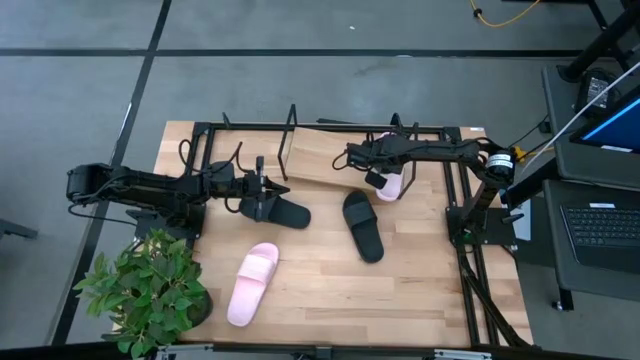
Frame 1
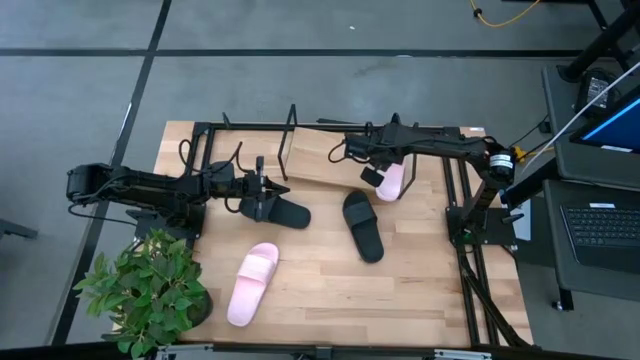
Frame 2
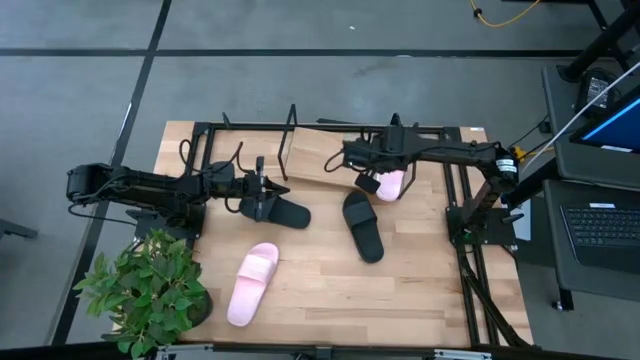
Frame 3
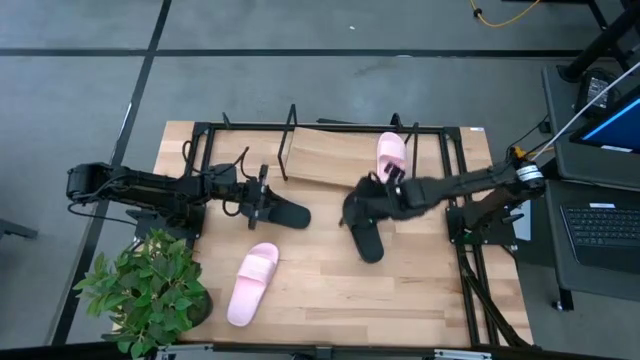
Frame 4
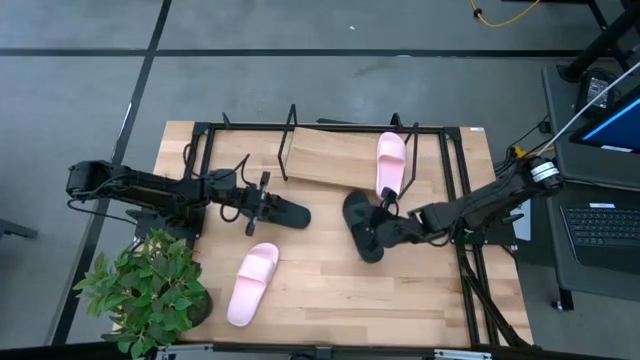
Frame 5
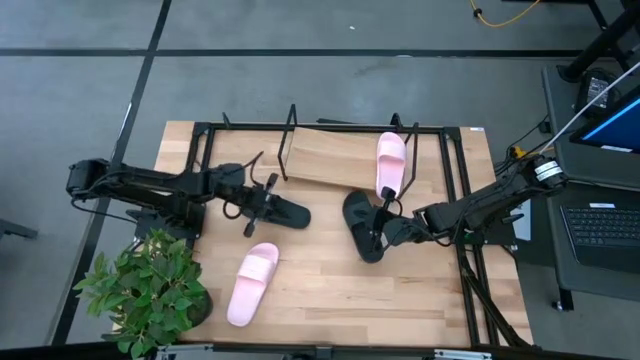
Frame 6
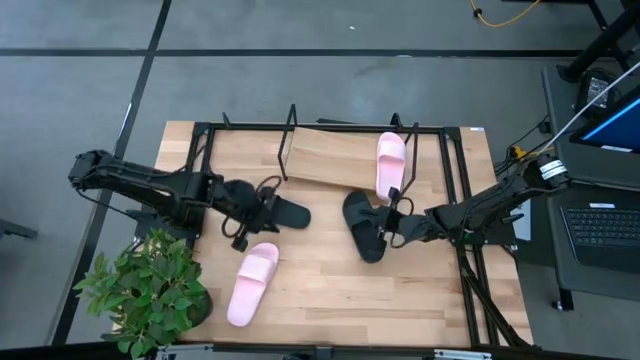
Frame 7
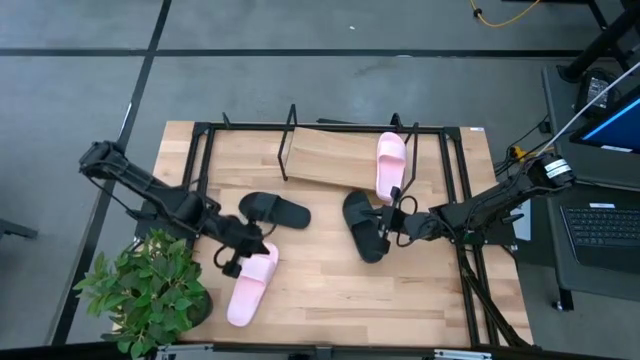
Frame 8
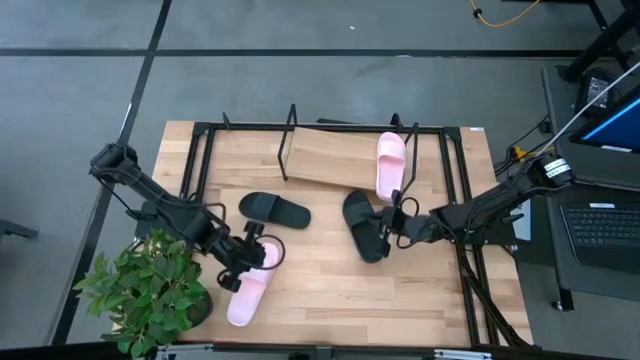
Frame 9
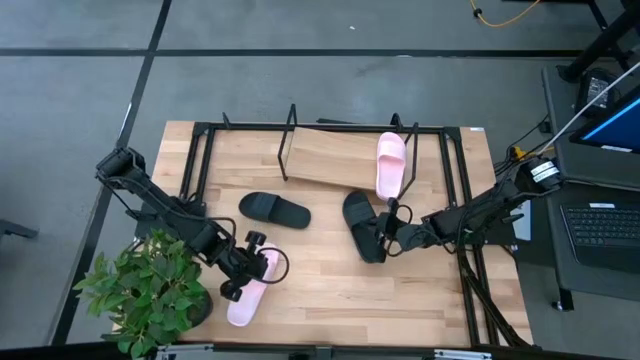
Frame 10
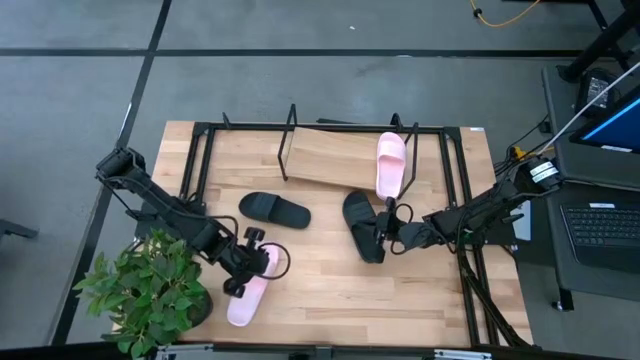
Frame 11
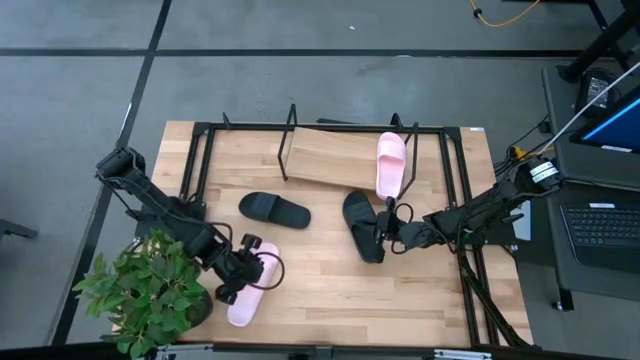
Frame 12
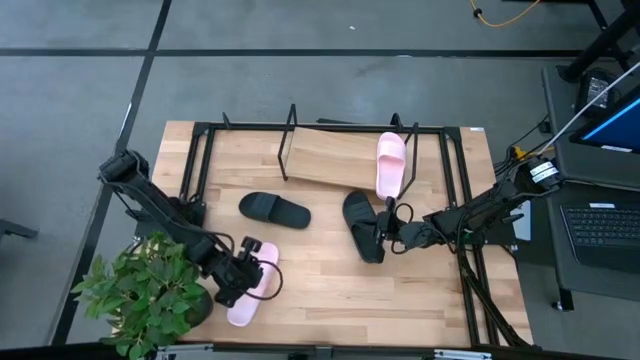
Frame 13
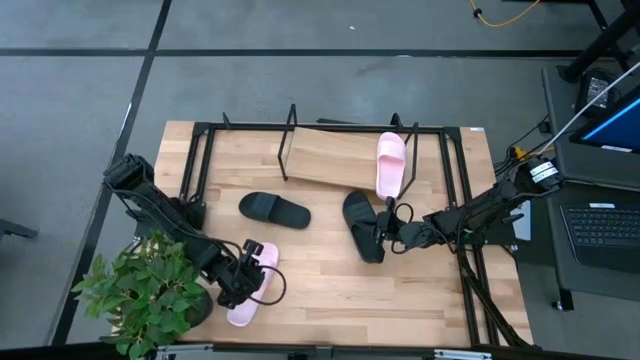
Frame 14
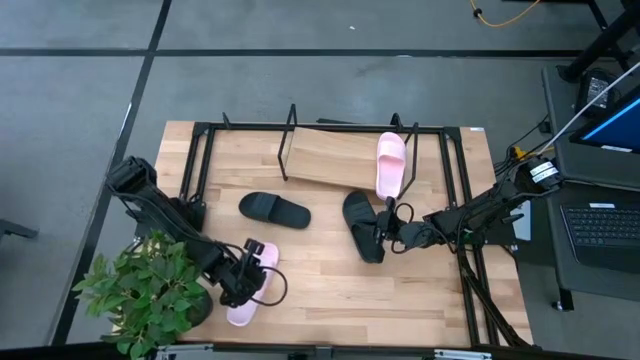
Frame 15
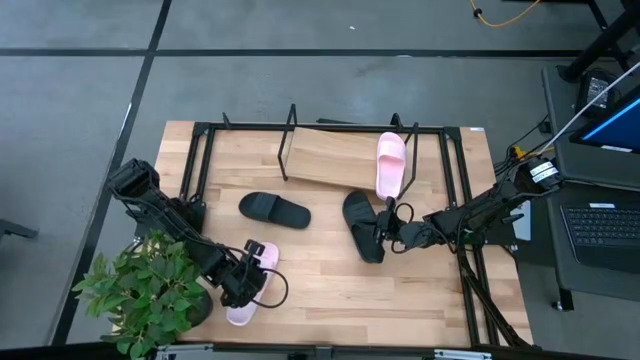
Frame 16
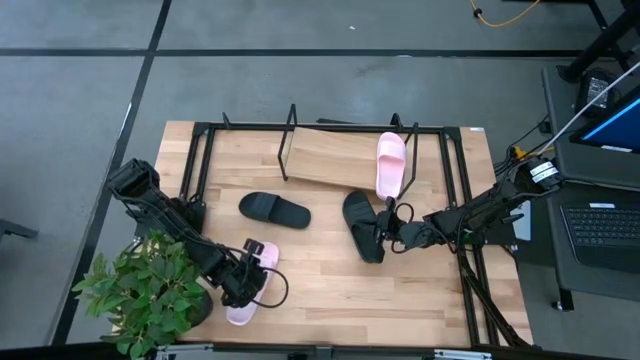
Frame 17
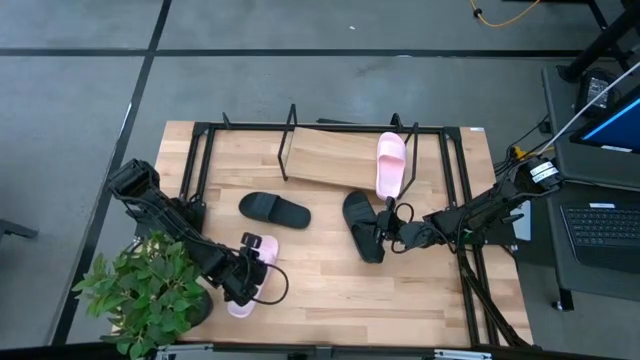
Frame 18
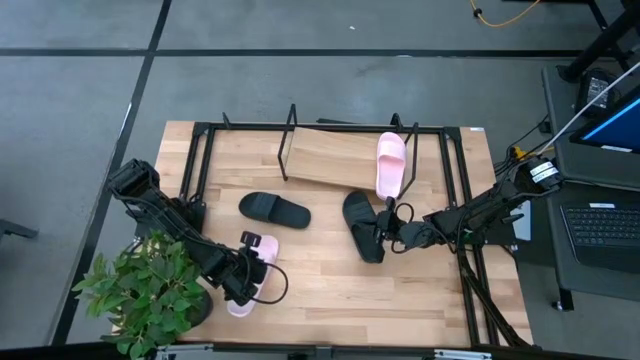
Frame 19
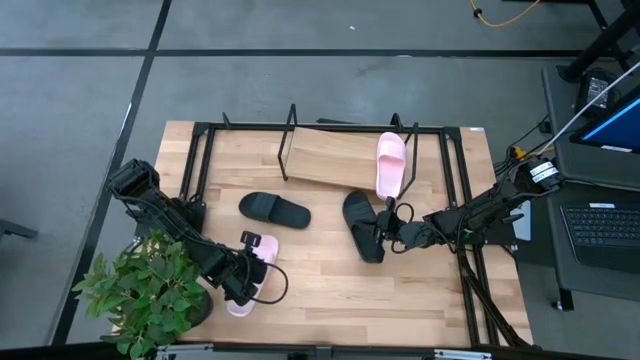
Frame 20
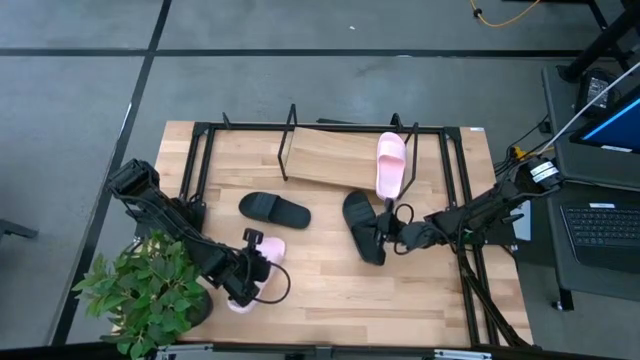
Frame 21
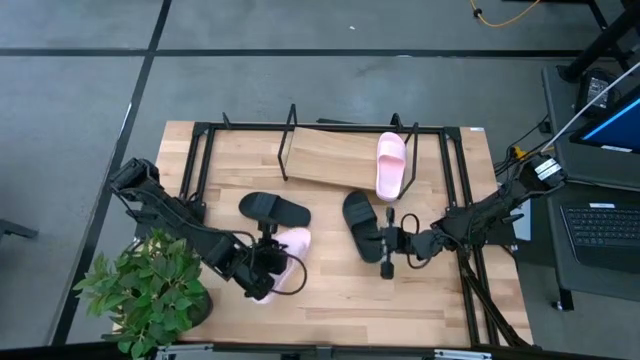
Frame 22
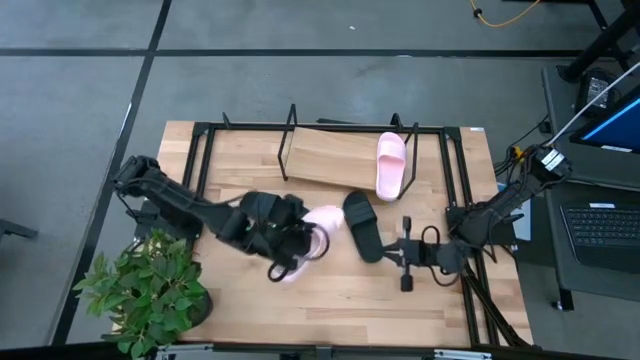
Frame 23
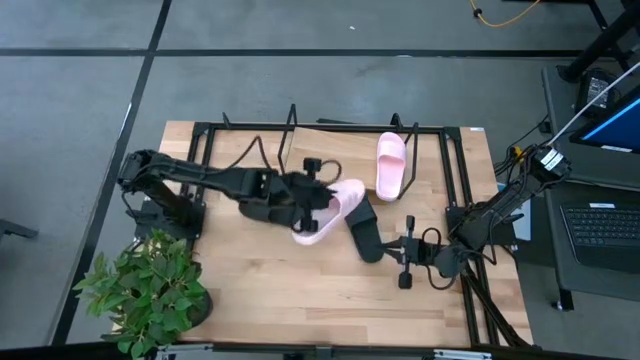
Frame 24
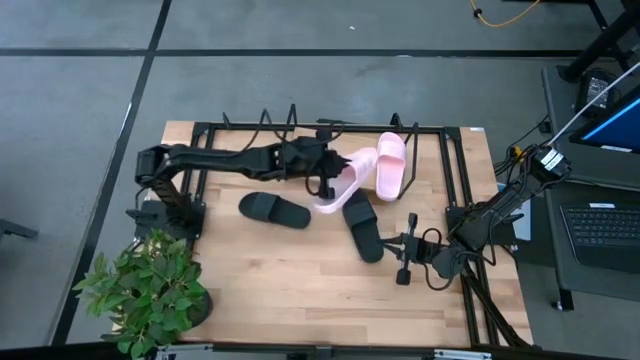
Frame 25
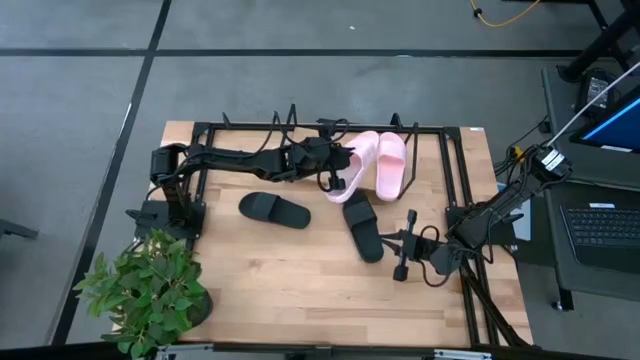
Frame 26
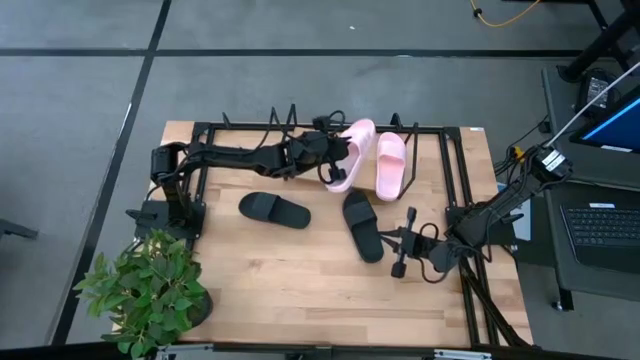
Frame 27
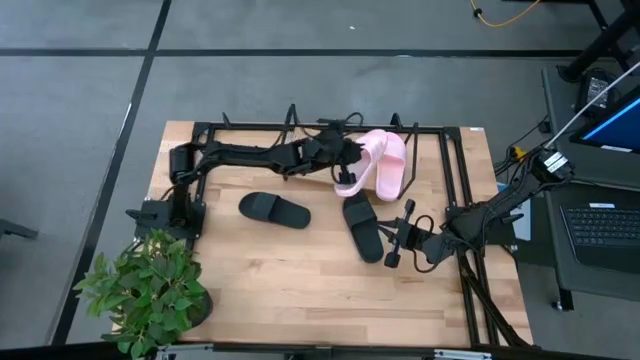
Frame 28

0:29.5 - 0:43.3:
Task: Pick and place slides into the shelf
Put the pink slide on the shelf
